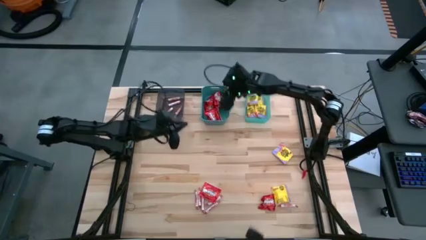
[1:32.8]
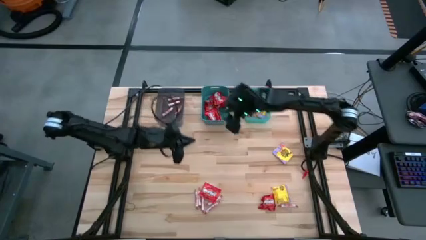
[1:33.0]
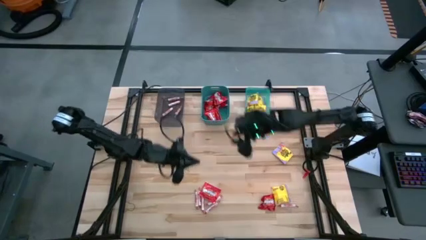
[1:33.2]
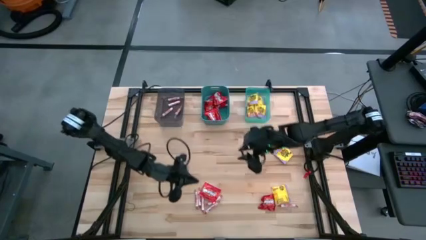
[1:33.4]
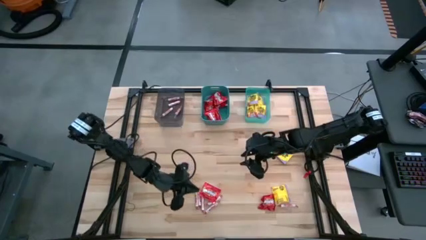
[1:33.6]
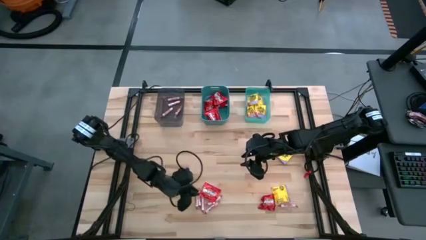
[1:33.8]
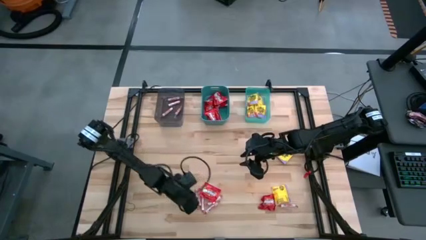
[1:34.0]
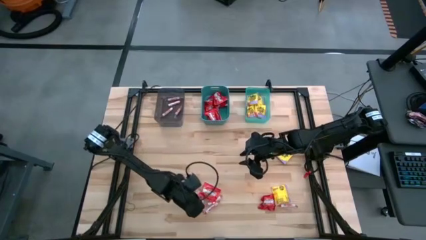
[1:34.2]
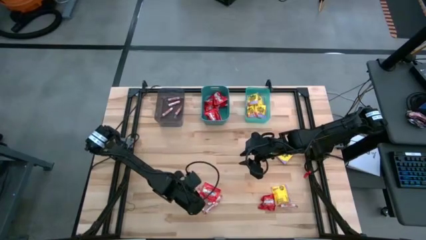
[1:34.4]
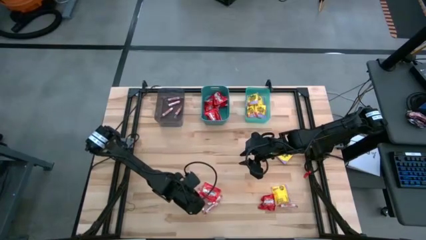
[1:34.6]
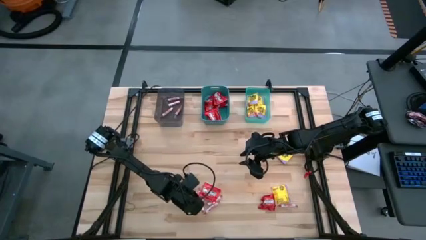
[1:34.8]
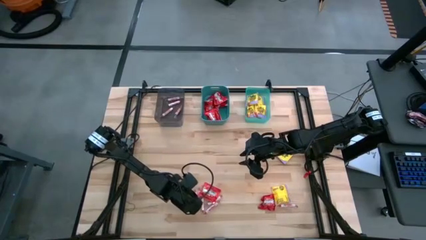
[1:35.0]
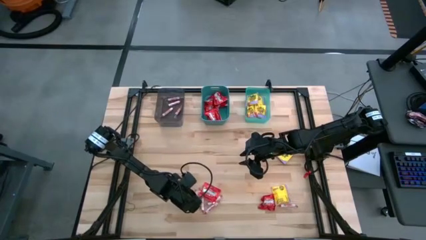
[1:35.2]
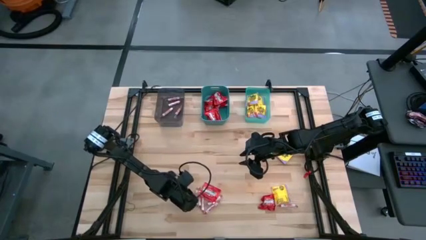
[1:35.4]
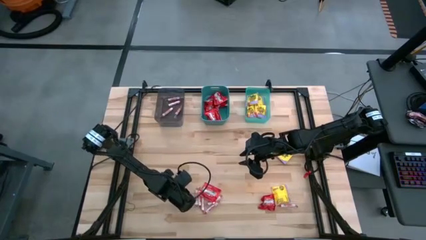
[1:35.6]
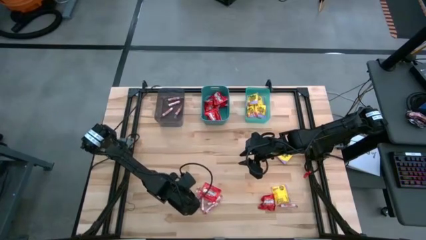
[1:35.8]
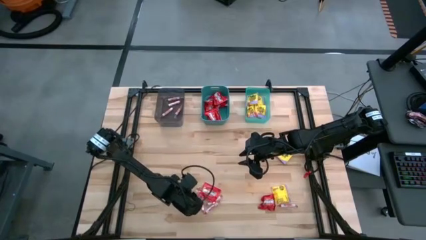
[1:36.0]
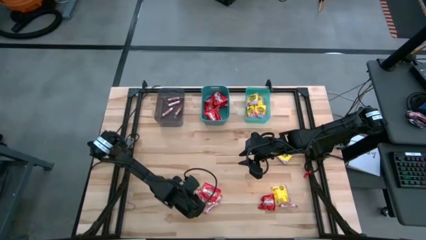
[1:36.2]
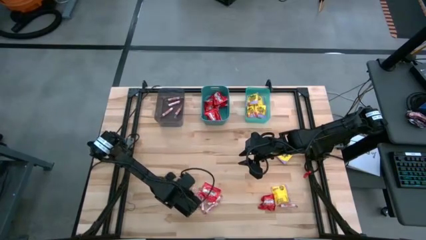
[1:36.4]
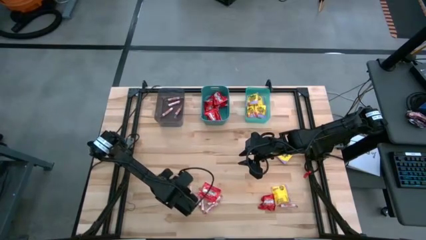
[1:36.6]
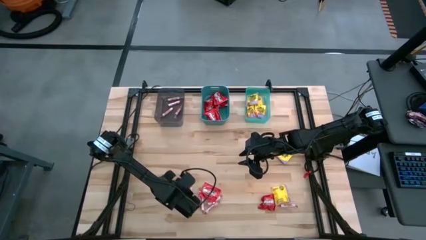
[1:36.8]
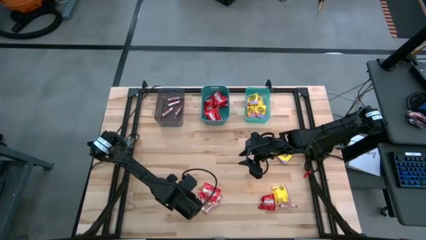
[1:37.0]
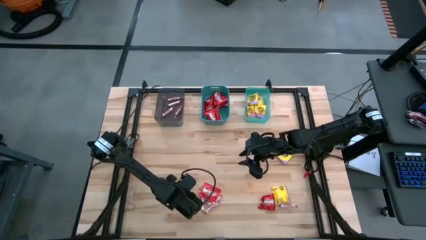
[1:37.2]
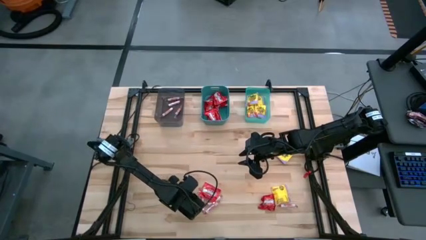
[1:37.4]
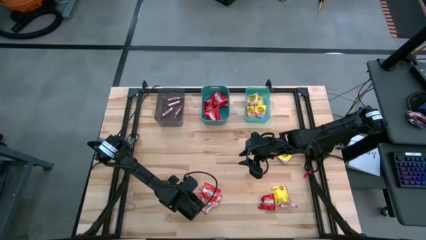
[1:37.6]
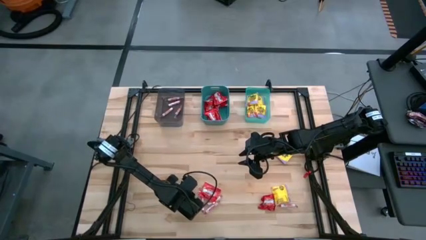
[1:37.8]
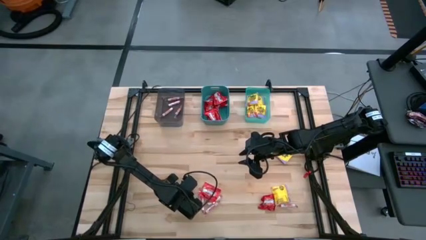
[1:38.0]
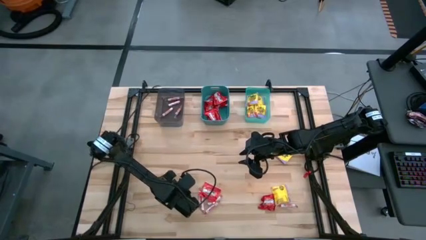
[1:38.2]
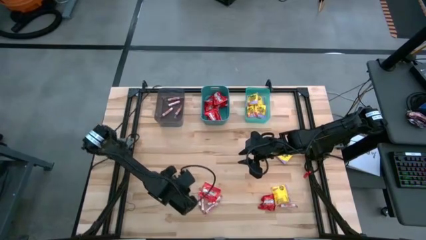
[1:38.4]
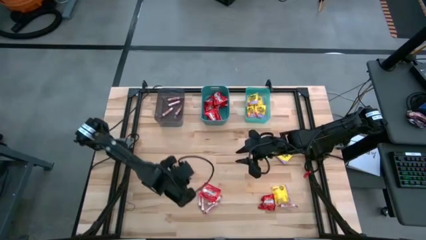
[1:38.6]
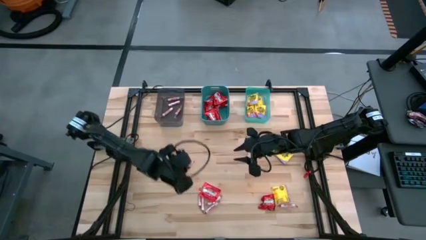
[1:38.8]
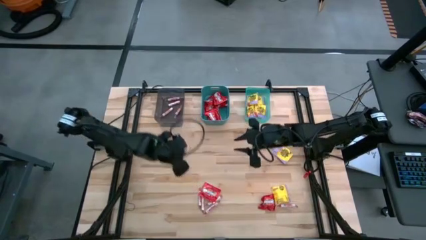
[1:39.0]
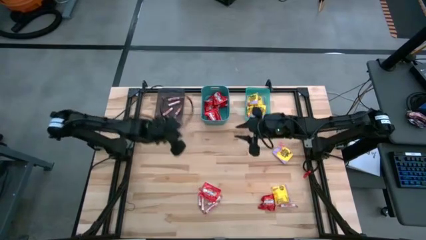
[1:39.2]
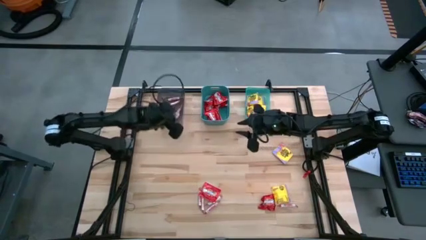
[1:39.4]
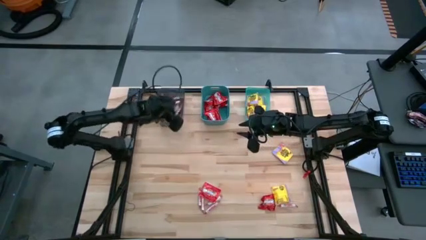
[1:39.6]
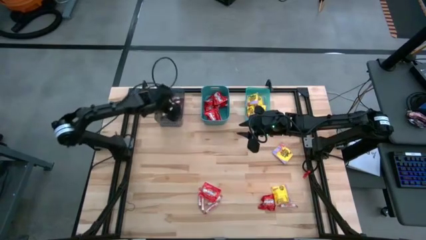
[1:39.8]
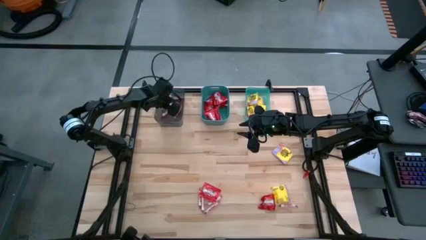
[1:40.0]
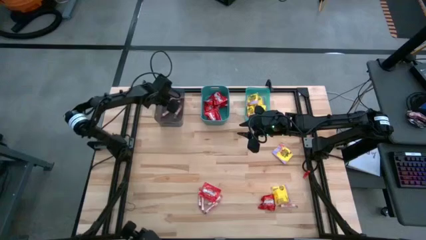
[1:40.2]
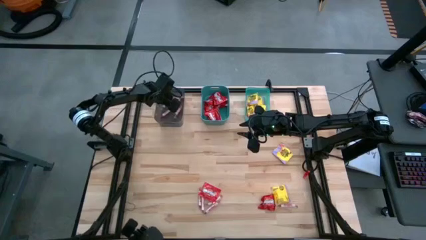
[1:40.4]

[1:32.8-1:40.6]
Task: Sort candy
Put the white candy on the black bin

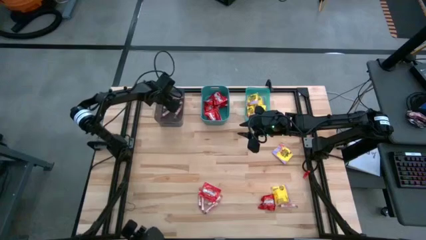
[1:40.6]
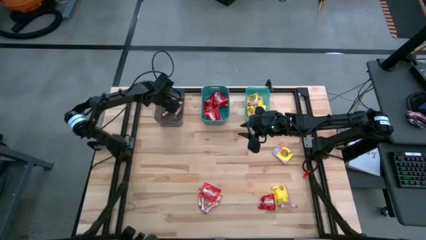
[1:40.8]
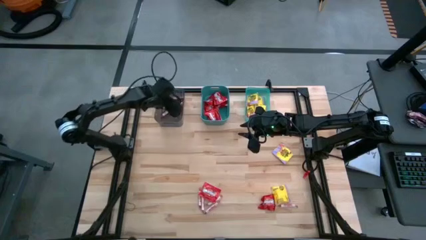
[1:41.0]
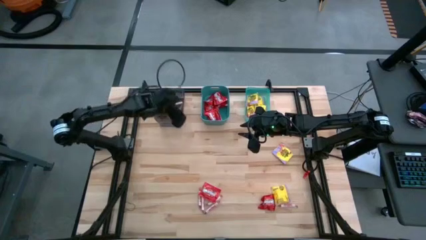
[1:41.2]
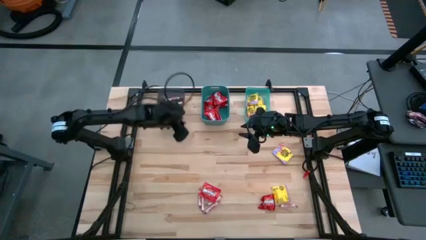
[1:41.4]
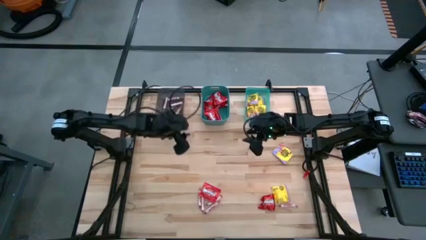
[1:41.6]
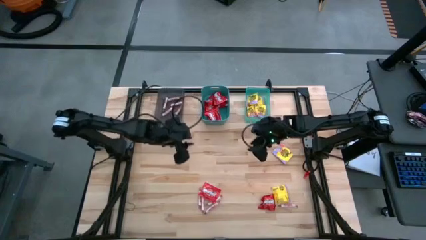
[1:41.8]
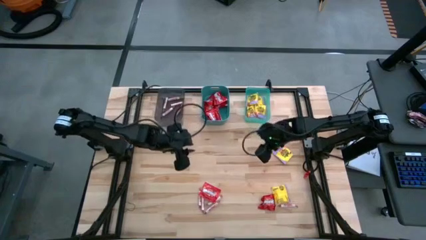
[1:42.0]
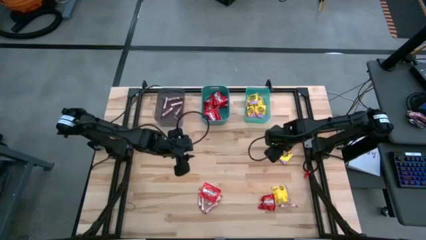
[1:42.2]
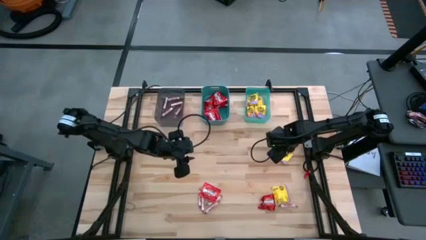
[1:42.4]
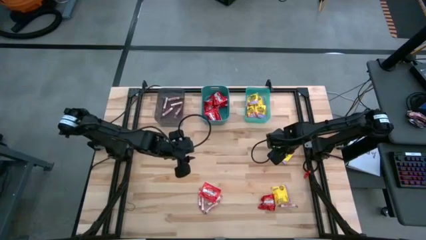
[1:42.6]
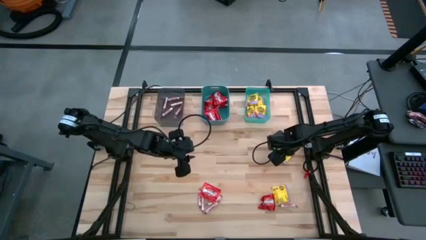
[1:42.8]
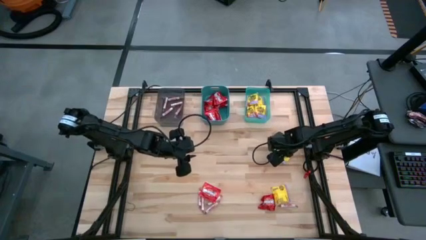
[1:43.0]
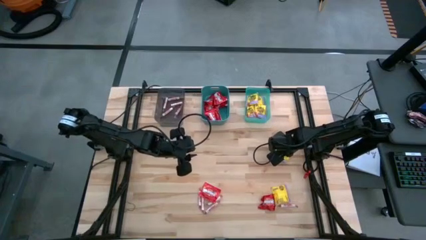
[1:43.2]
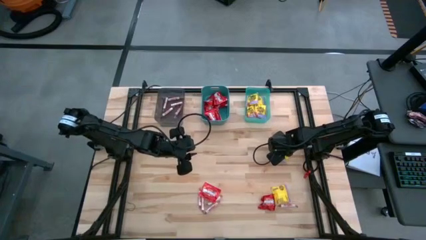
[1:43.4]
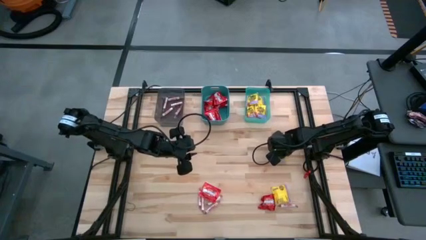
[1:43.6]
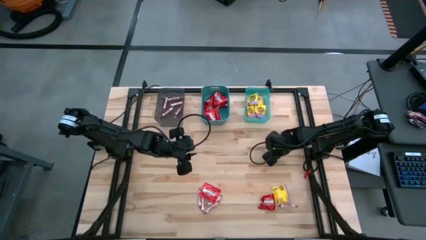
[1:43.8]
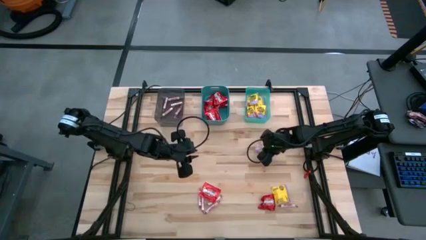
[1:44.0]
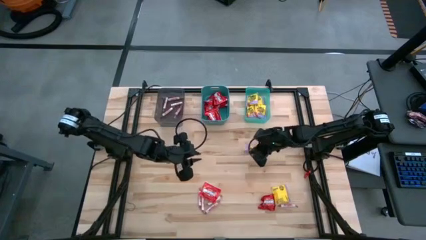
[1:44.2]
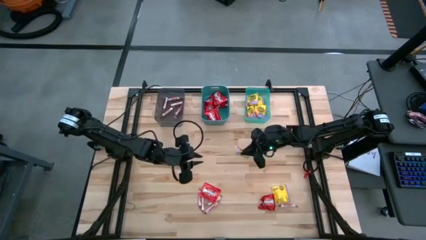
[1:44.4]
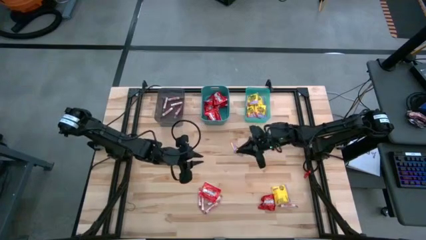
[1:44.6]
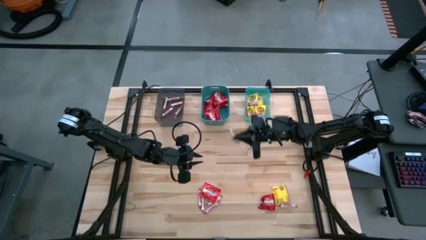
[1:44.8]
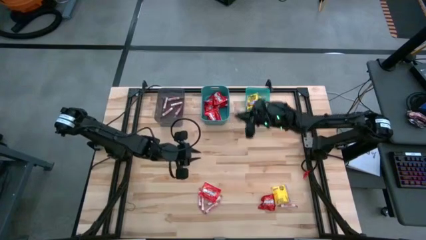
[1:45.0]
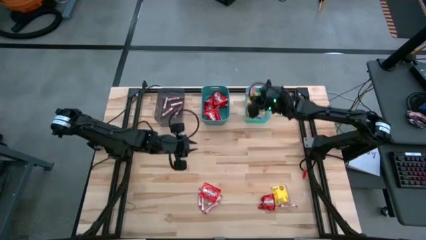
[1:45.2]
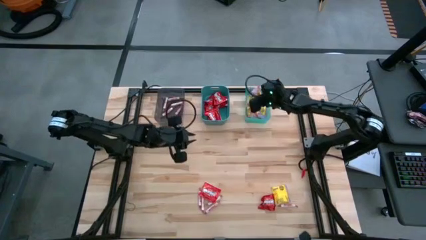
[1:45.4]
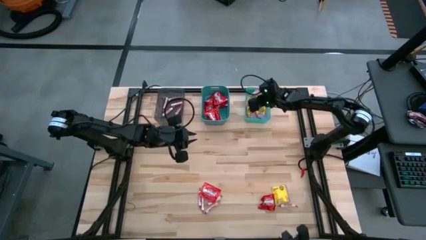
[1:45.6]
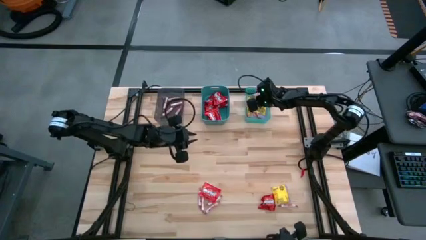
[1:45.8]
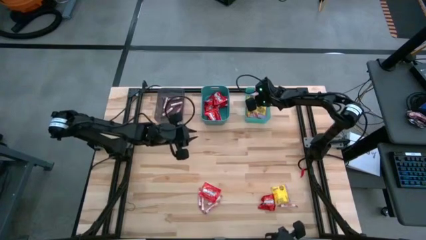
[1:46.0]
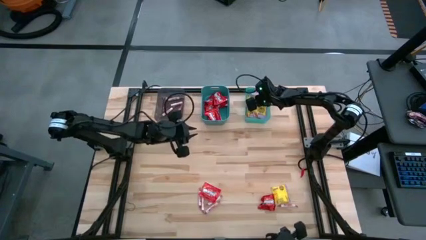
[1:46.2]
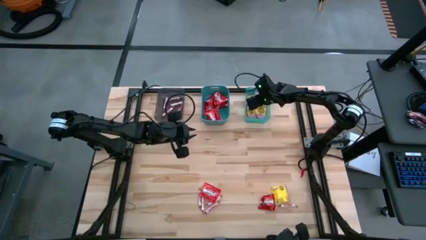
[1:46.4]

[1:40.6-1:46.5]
Put the yellow candy on the light green bin

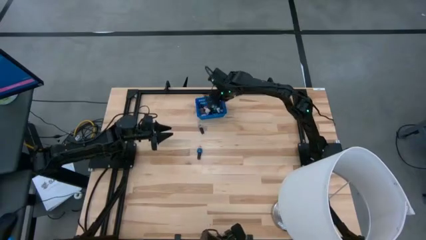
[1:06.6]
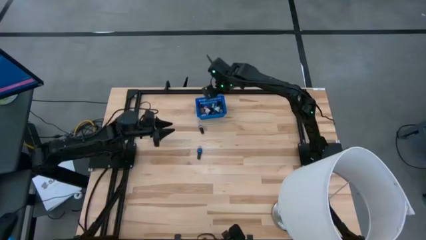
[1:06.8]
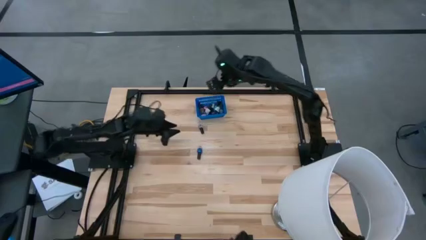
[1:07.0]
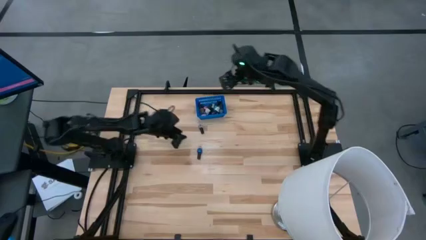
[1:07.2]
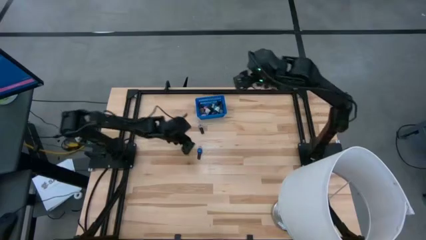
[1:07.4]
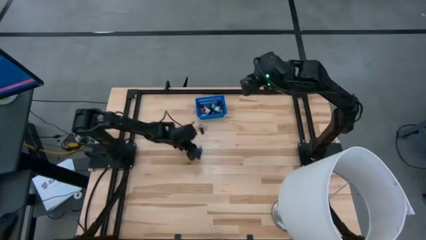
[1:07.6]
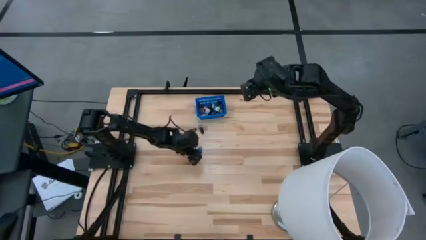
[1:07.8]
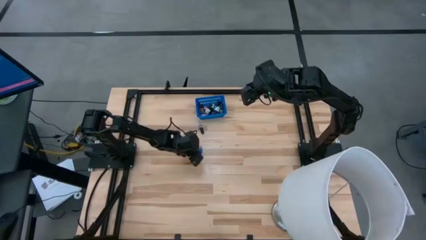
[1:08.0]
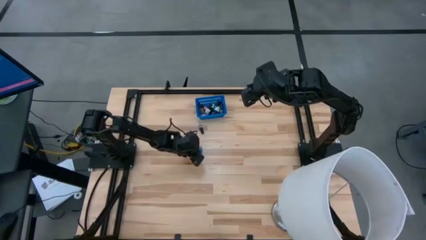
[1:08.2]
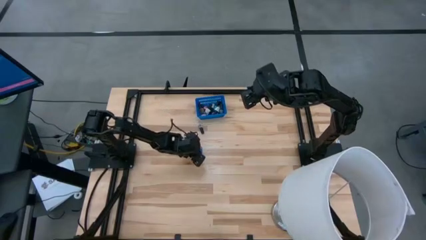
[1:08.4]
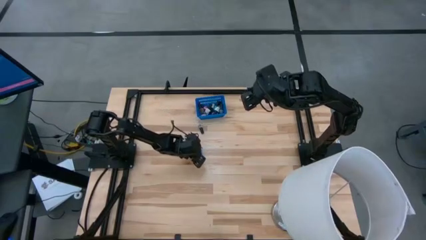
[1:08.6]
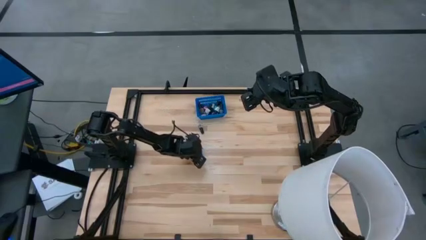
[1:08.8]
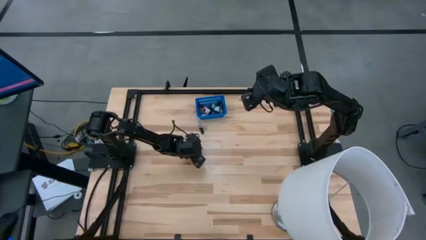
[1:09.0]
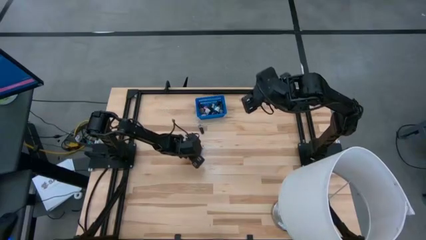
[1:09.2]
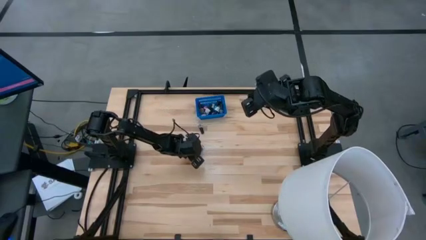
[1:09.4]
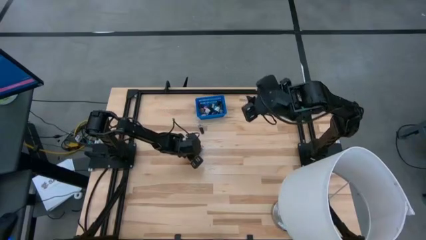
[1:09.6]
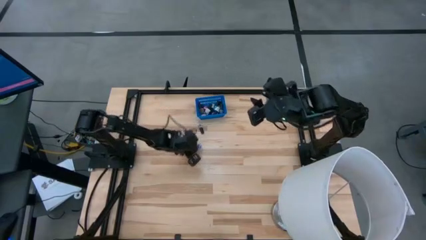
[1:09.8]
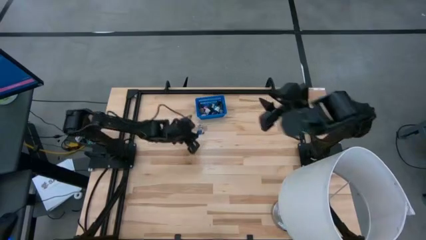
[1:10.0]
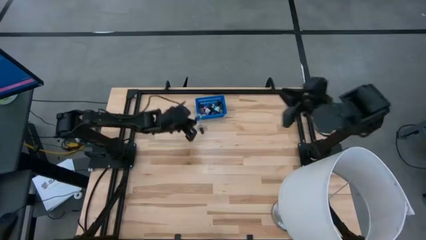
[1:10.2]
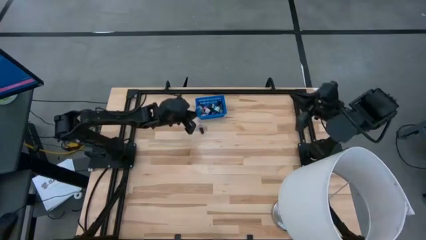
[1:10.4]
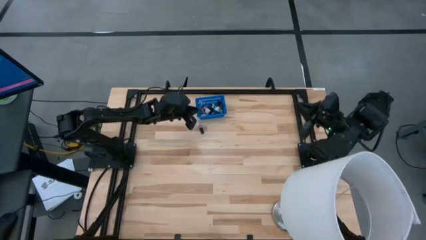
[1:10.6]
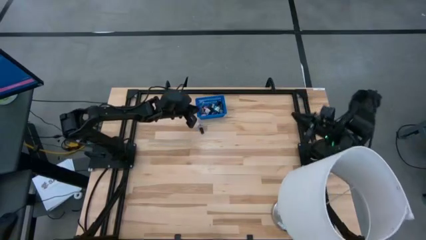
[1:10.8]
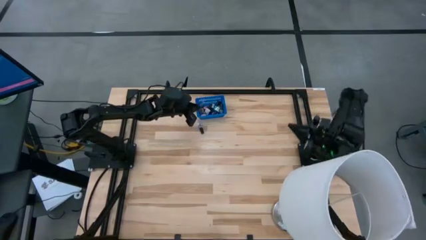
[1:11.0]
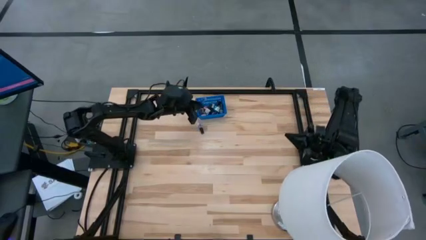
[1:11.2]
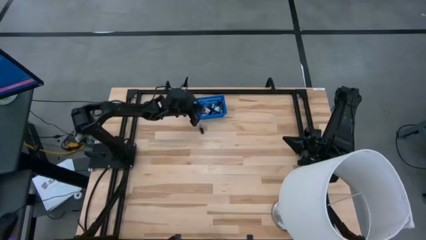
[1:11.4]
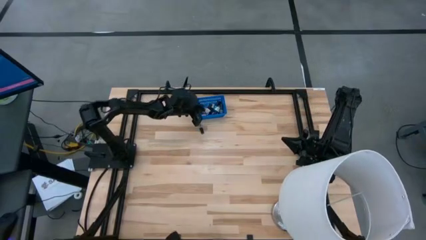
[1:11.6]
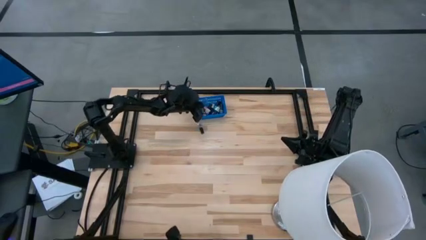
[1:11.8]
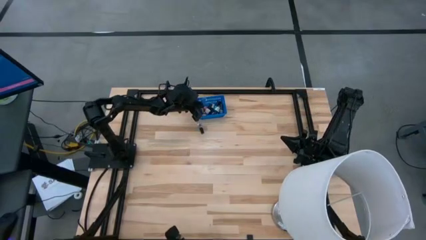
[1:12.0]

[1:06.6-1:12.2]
Task: Pick & Place Nail Polish
Put the dark blue nail polish bottle into the blue basket
